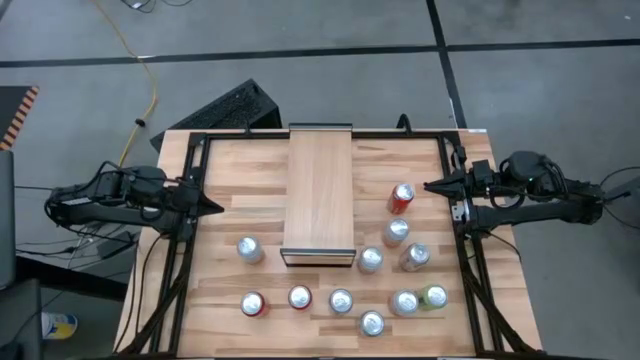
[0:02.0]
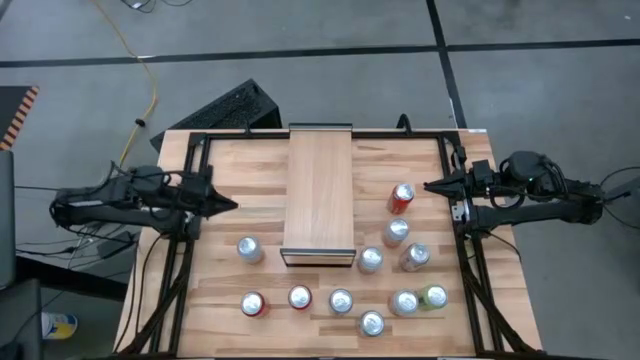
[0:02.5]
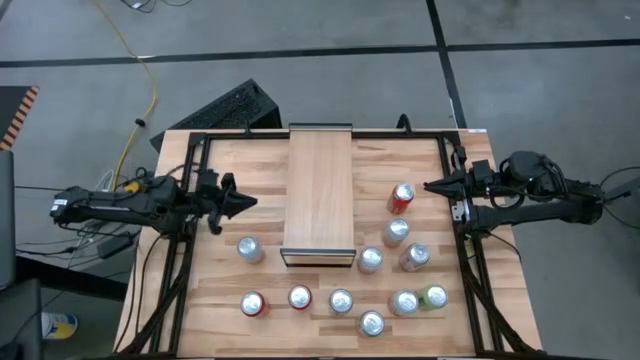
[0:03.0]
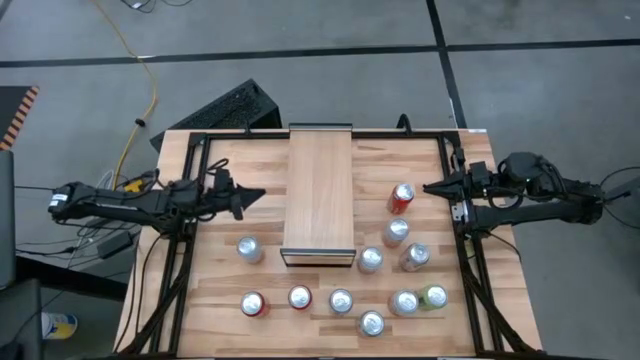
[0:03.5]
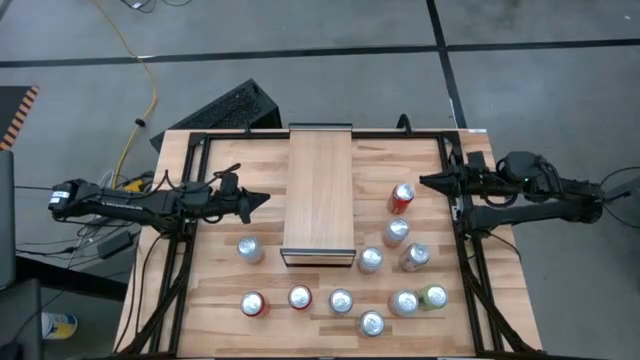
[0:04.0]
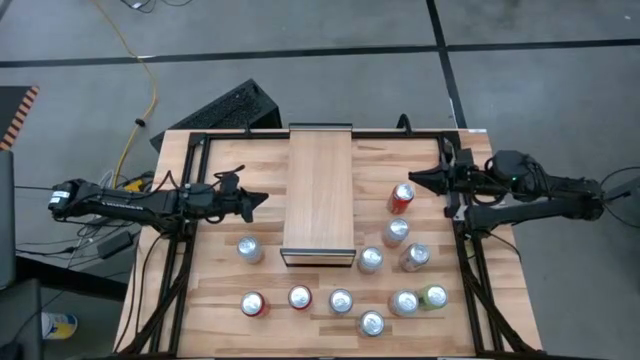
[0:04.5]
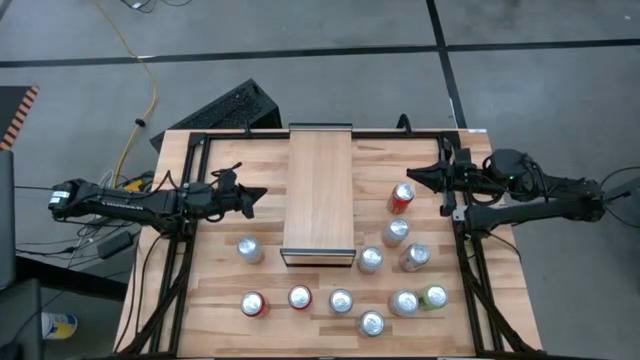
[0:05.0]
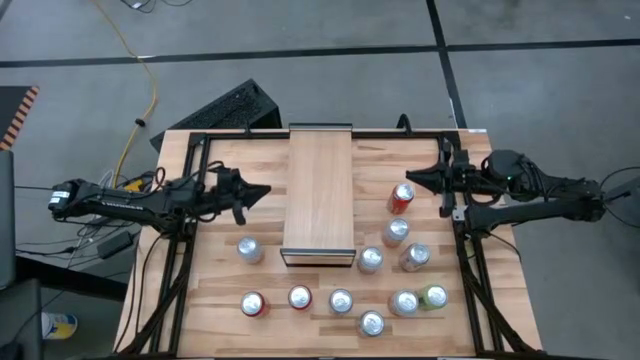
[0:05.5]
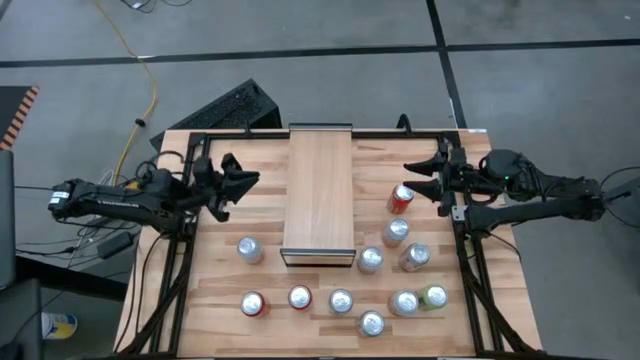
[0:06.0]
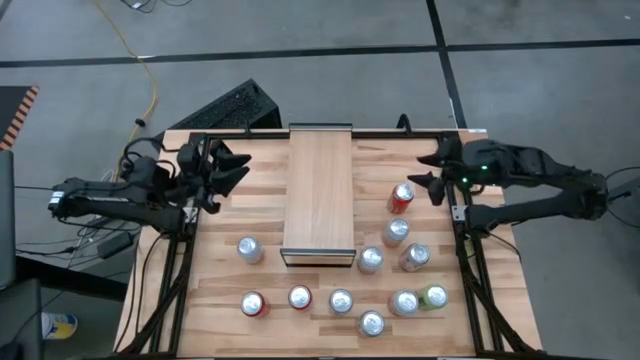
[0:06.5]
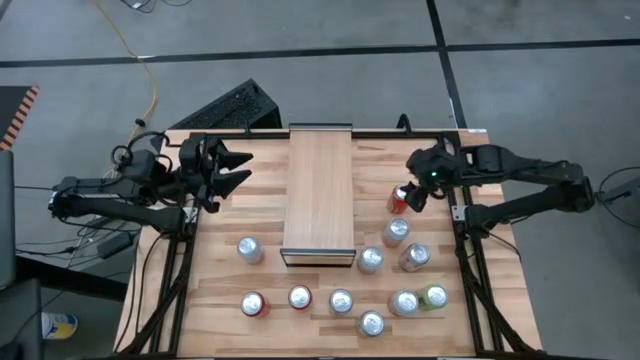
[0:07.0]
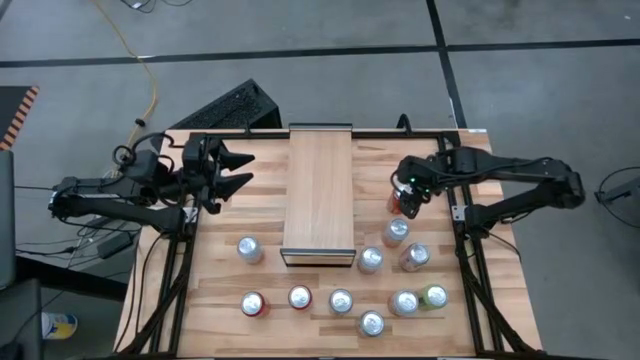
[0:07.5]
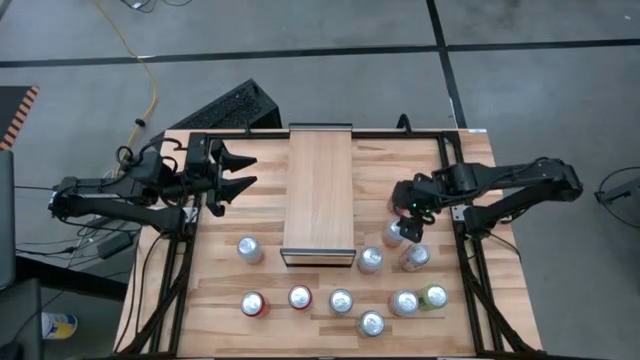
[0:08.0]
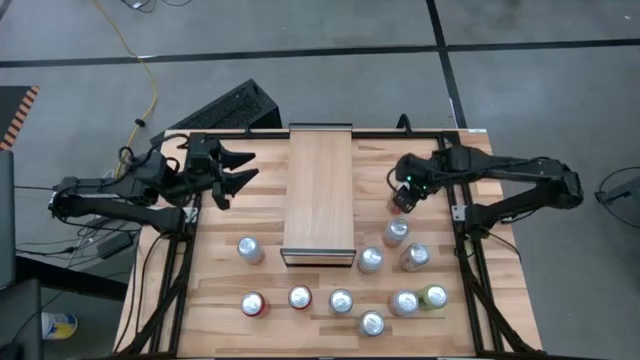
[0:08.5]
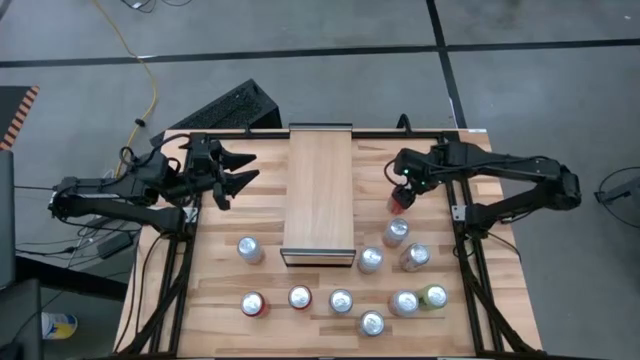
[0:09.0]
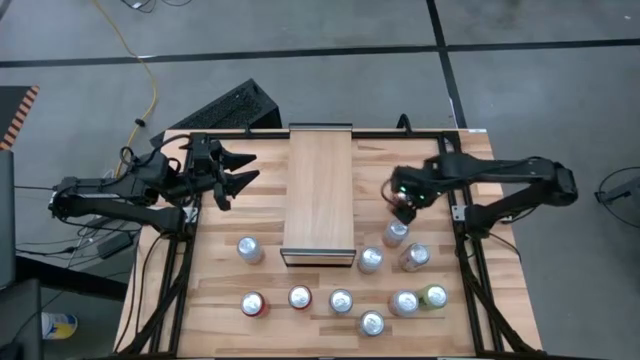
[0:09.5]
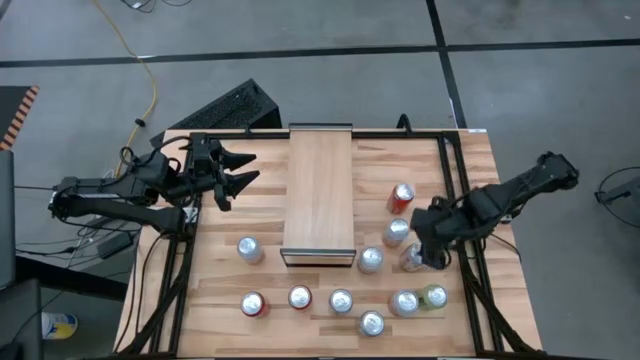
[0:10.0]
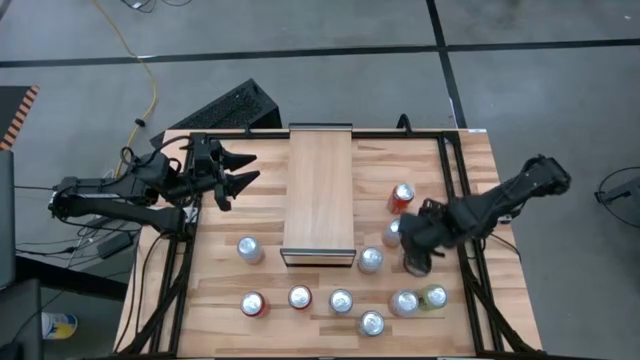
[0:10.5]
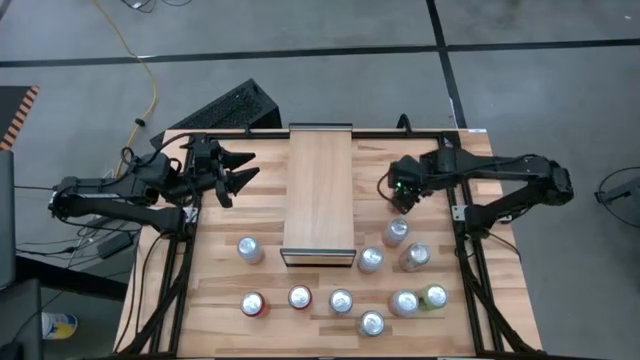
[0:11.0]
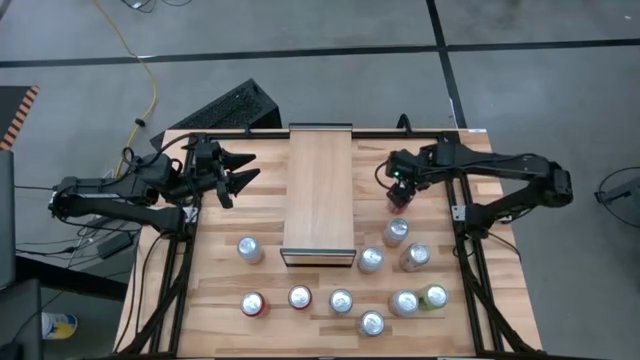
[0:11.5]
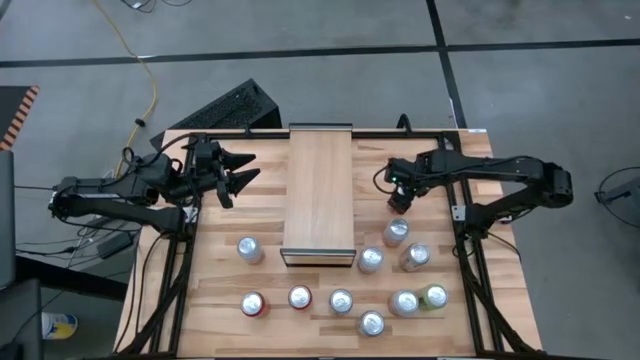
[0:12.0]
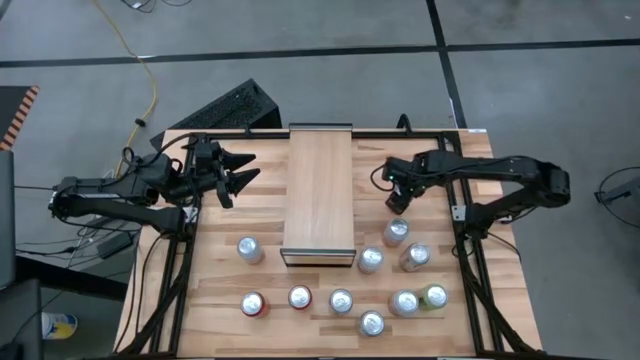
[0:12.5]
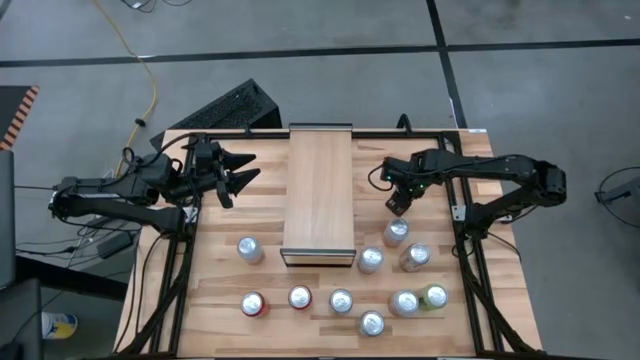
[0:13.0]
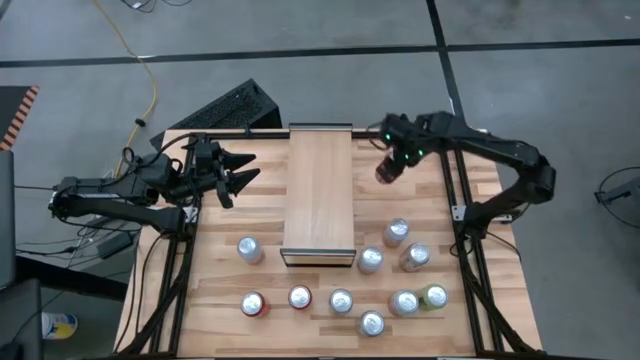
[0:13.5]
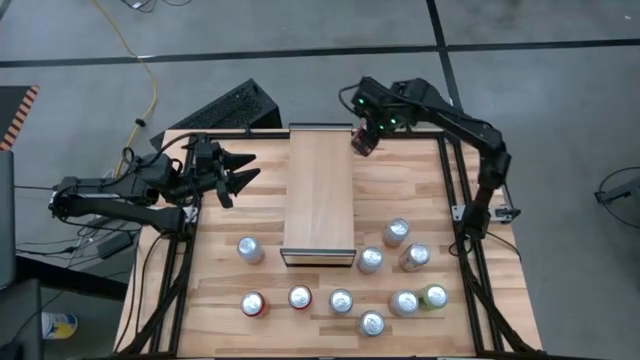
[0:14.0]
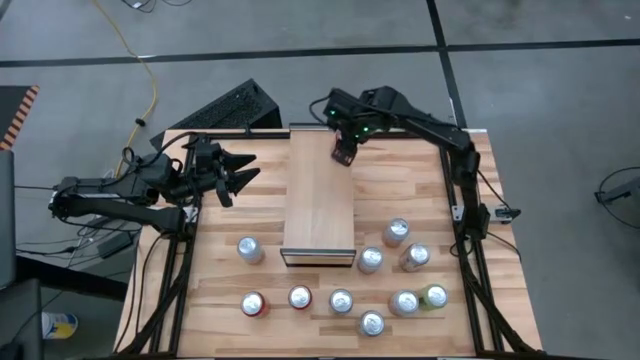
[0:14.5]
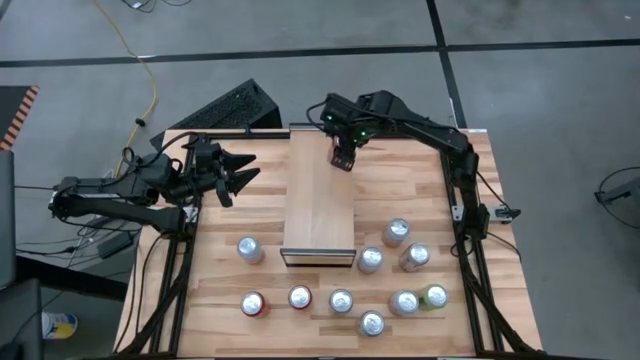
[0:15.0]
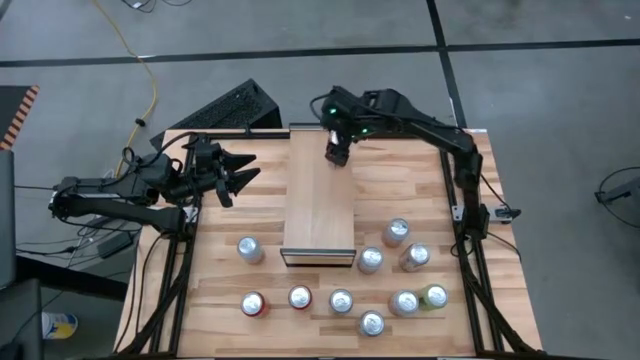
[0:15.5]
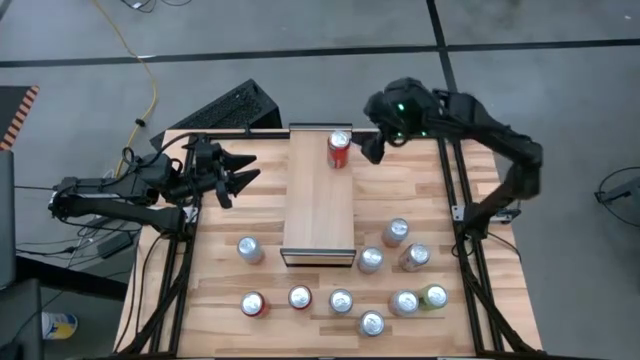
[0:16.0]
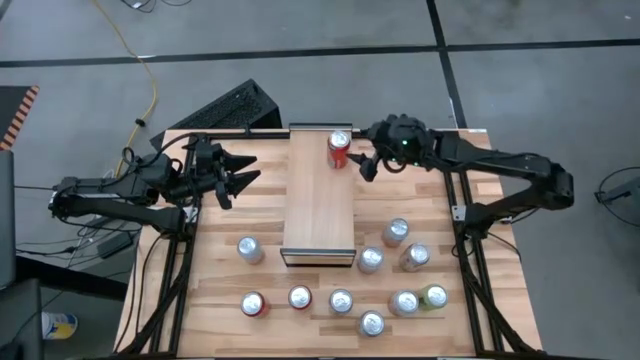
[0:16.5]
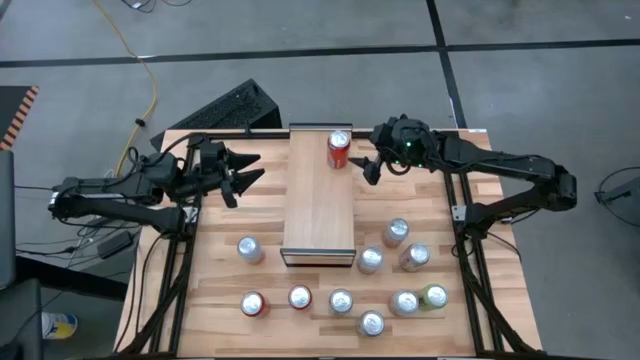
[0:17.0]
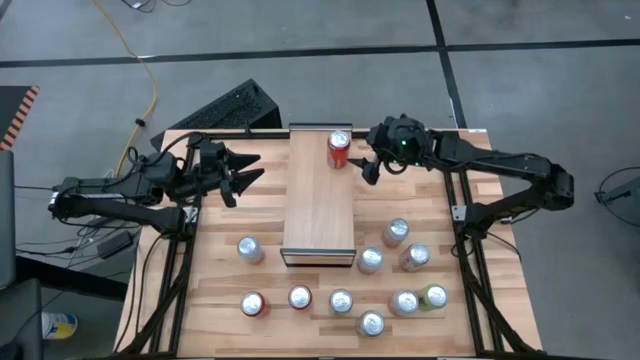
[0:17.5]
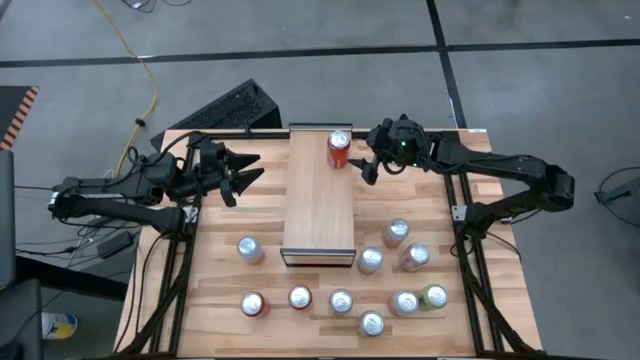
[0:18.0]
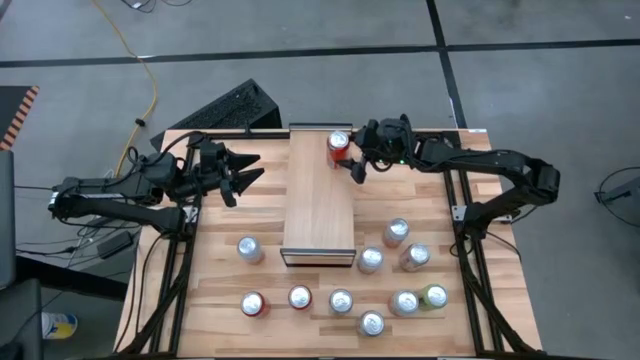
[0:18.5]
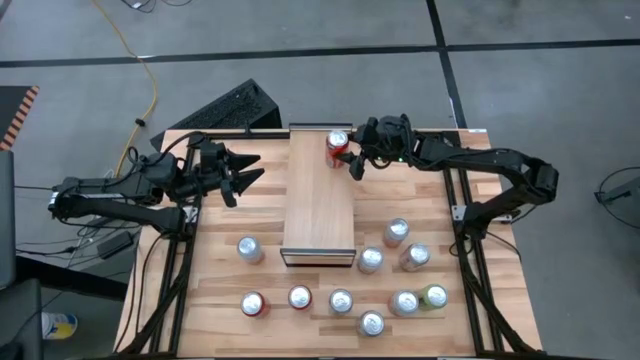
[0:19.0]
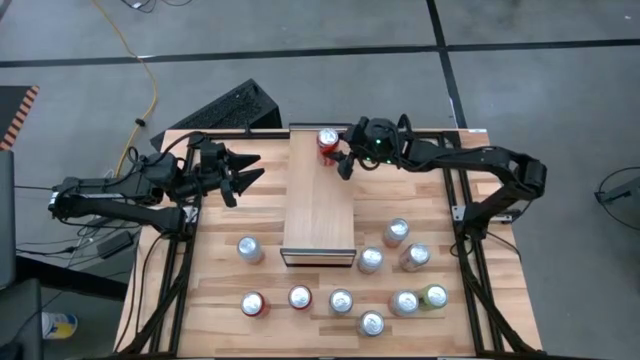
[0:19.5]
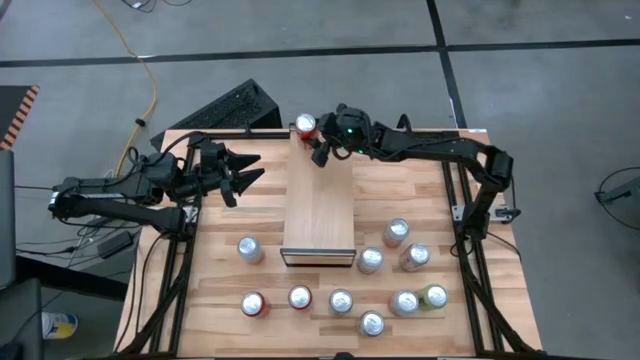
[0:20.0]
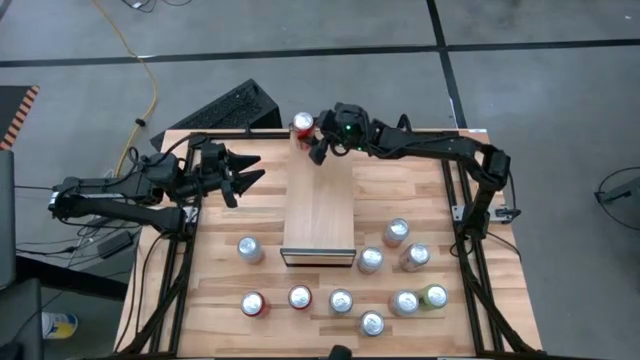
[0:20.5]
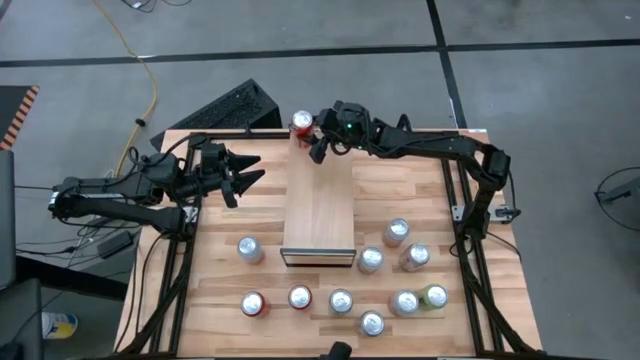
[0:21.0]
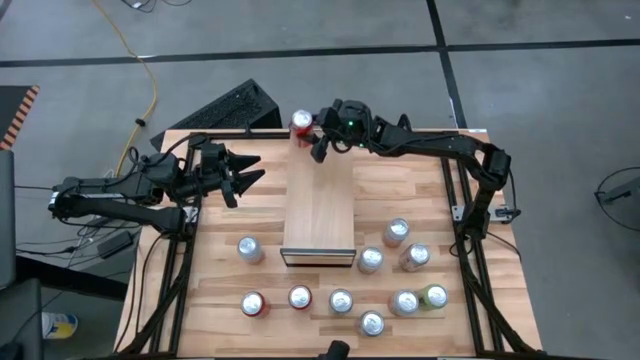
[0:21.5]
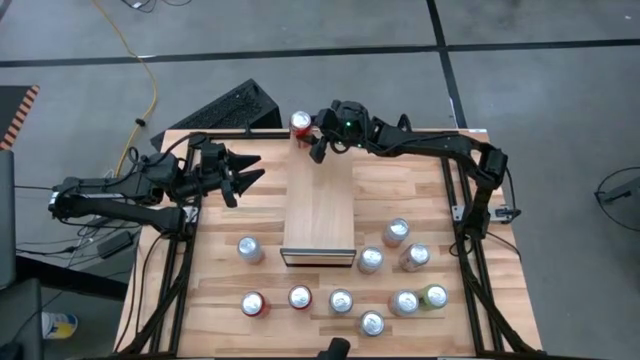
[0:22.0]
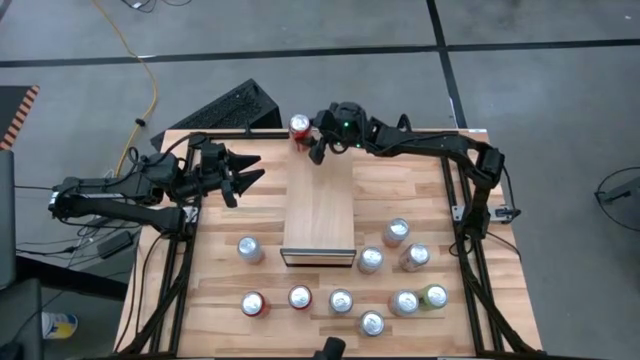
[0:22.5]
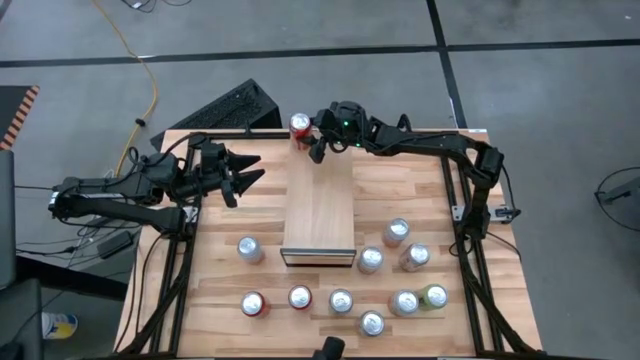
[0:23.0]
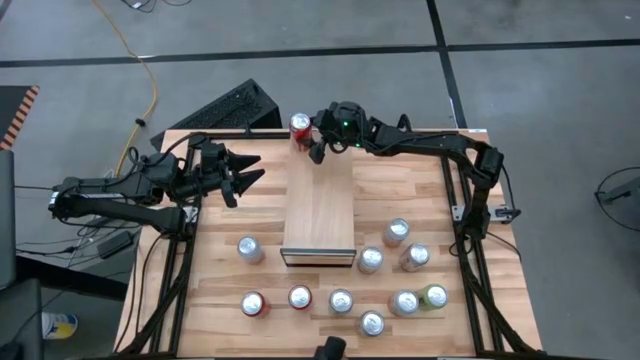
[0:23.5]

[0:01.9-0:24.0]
Task: Place canned beverage on shelf
Put the top red soda can on the shelf
